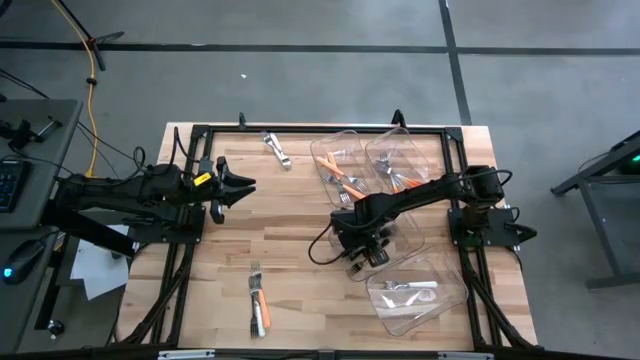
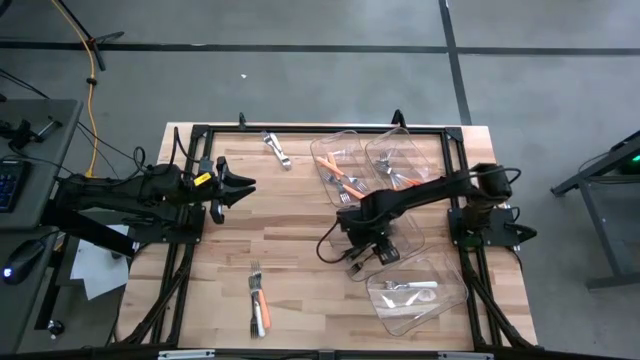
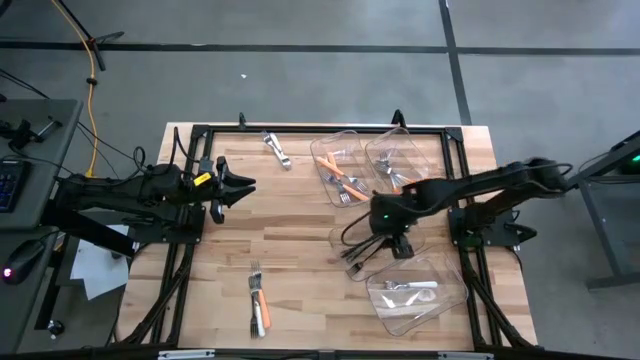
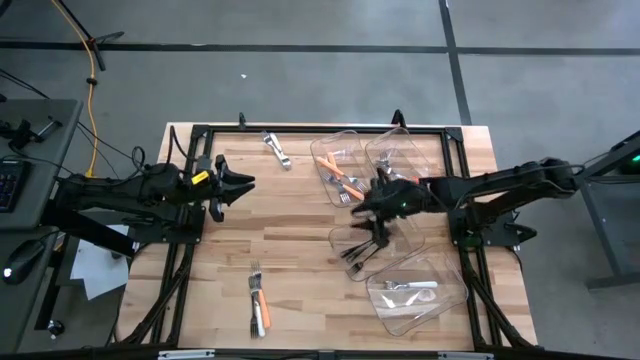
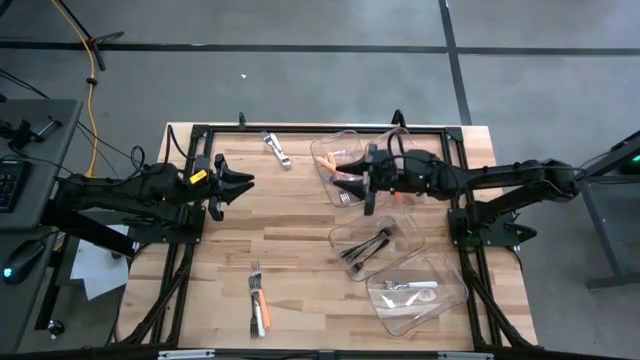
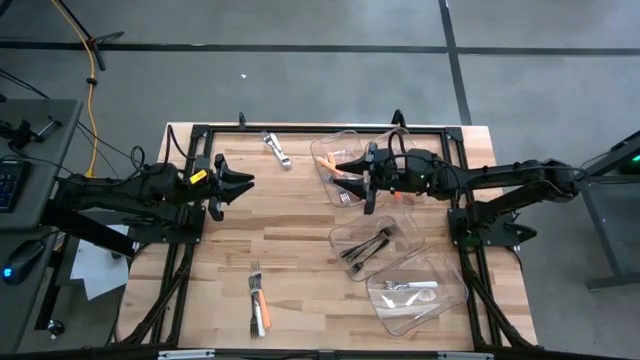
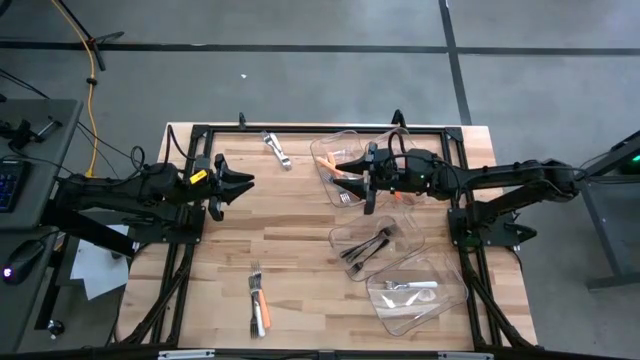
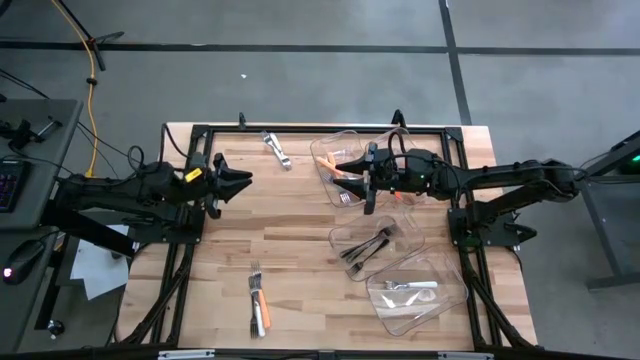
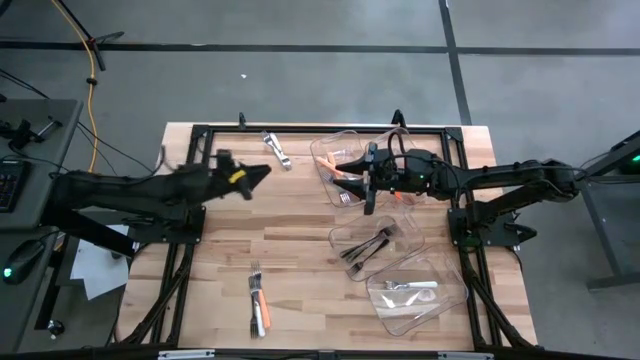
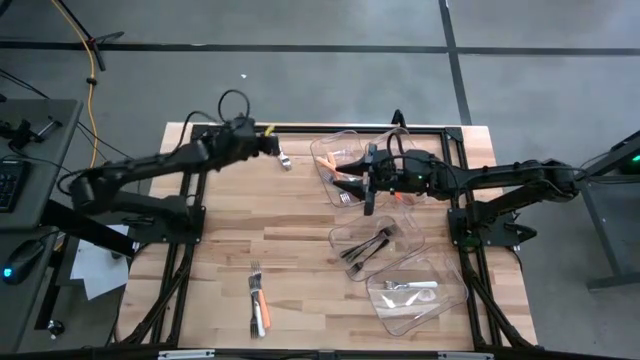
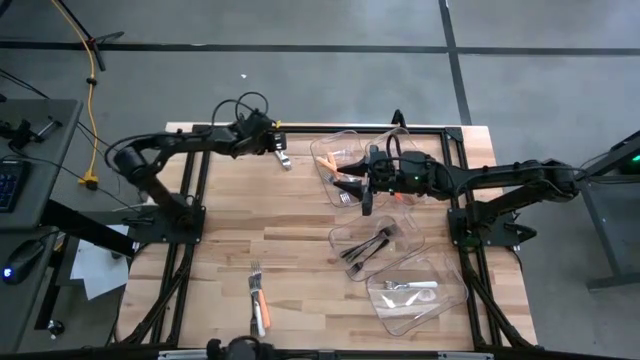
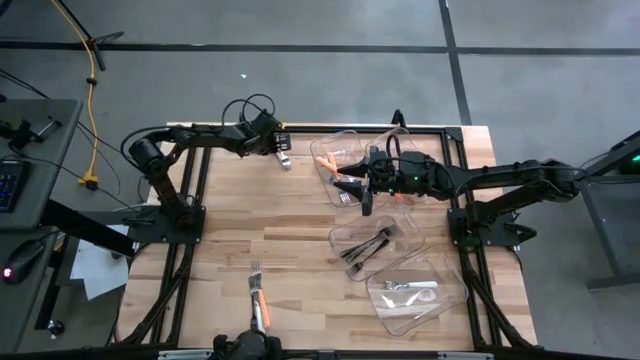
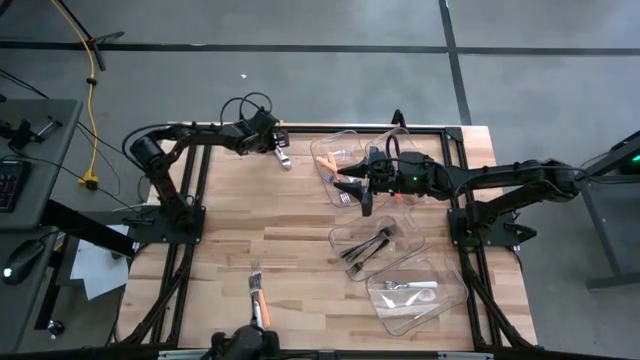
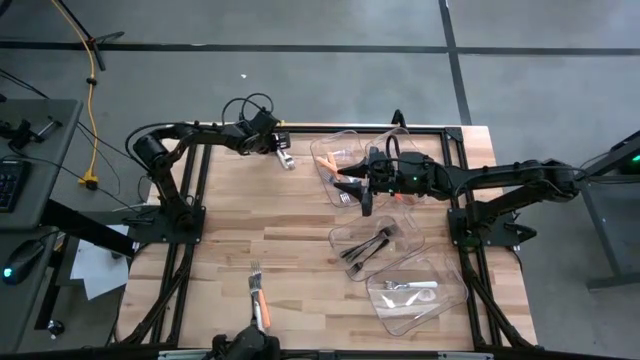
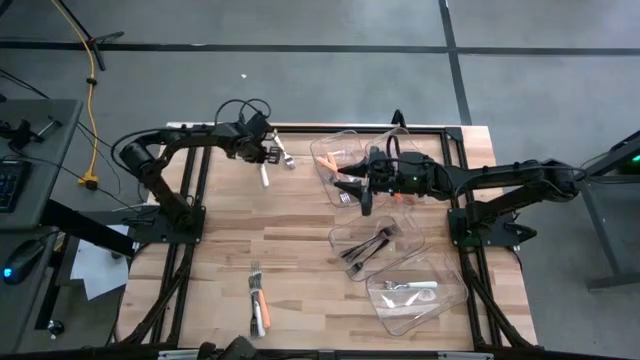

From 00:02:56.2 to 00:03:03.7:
Task: Sort silverware by color (type)
Move the top white fork to the bottom

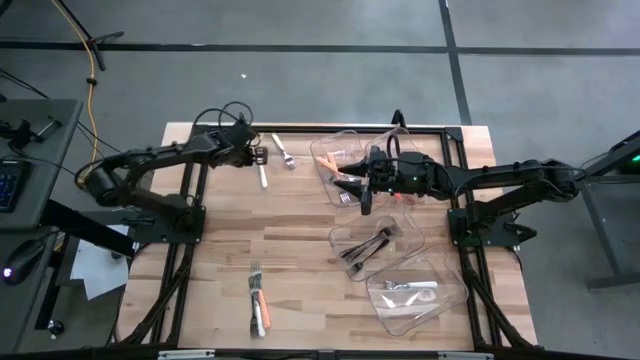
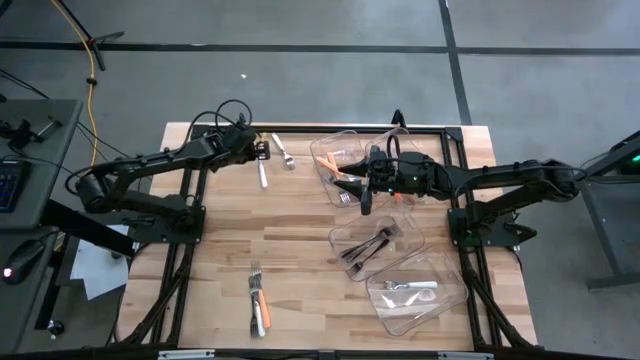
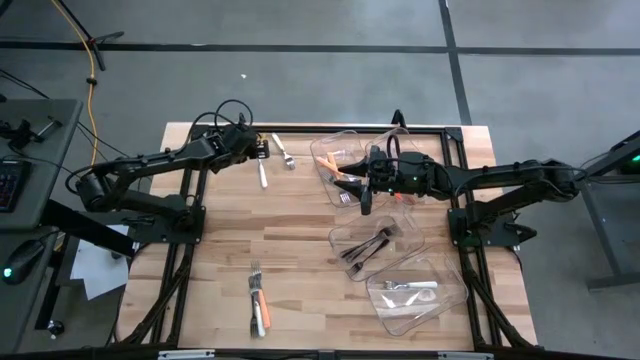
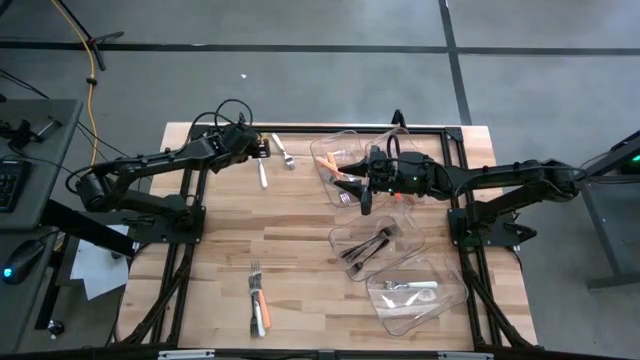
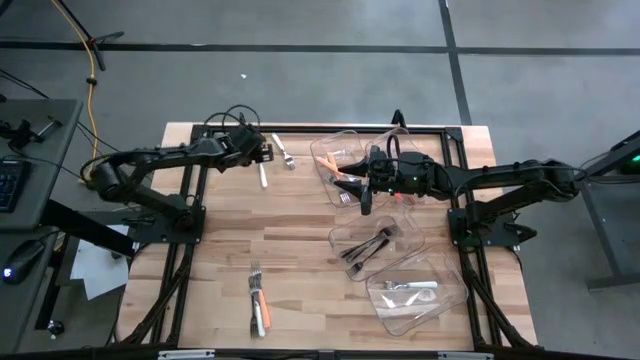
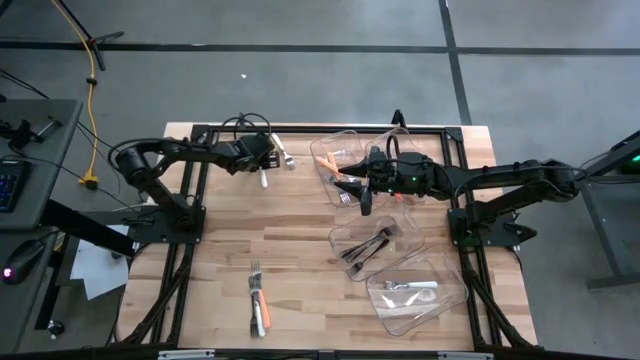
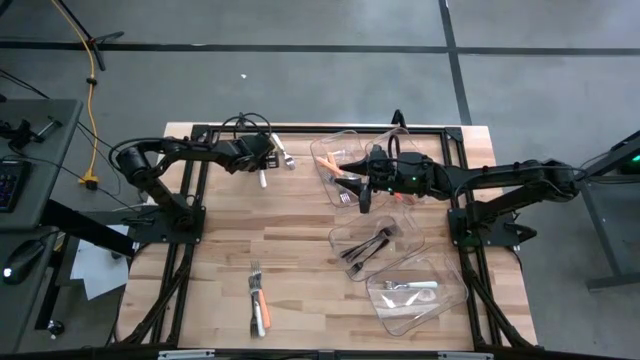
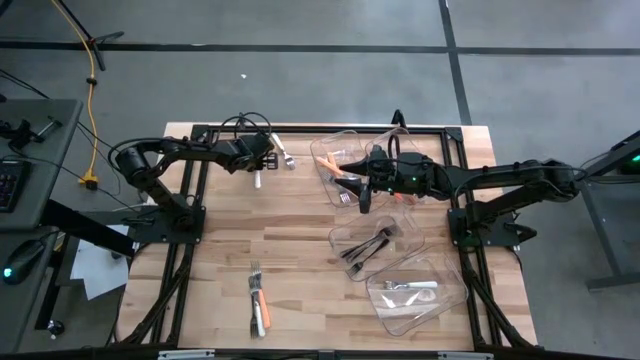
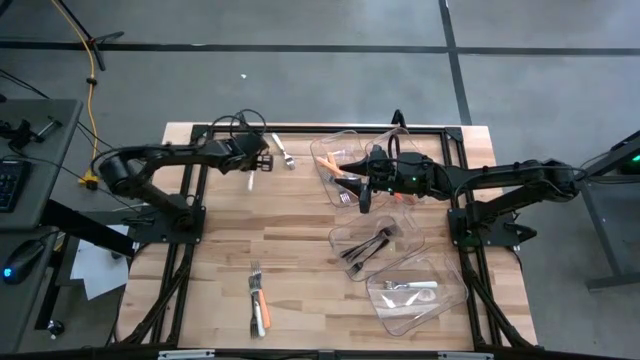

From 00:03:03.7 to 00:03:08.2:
Put the white fork into the bottom transparent bin

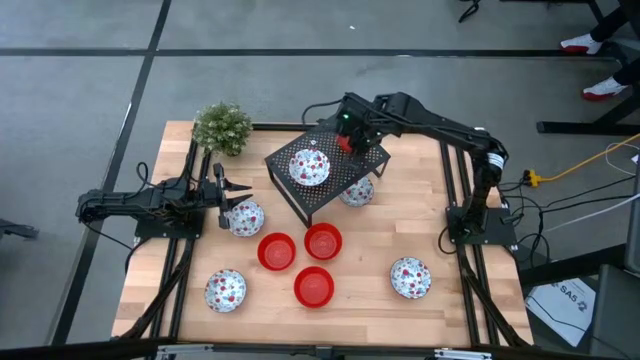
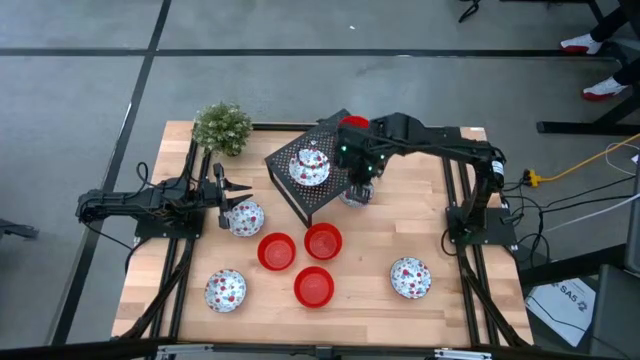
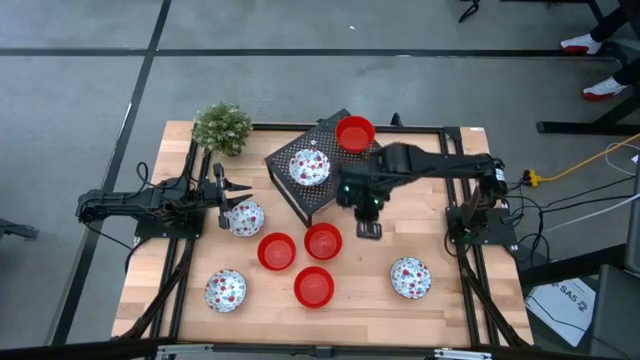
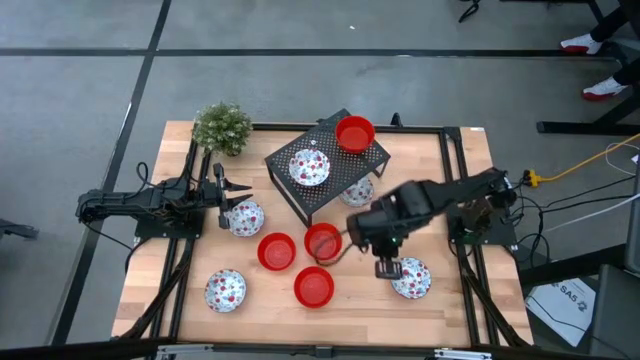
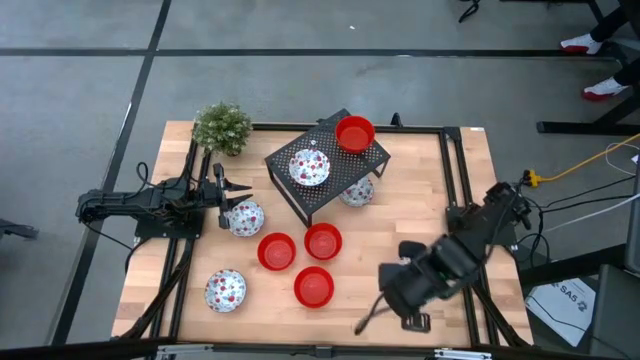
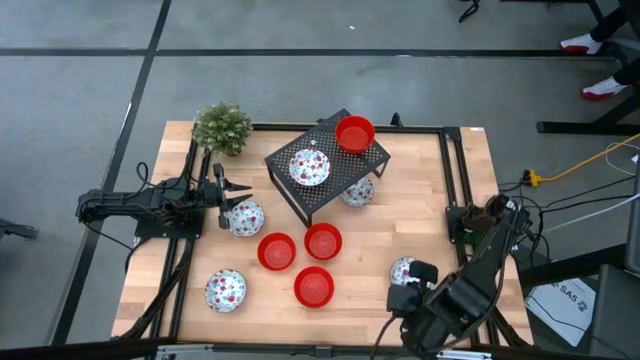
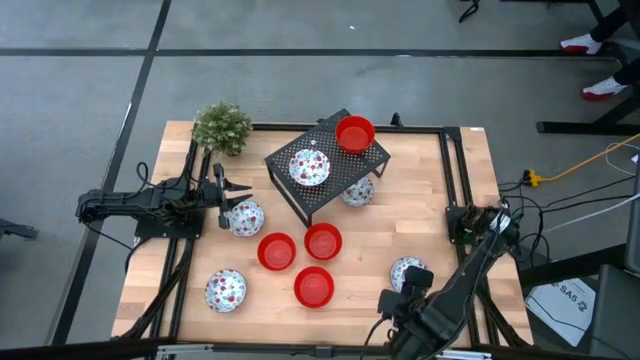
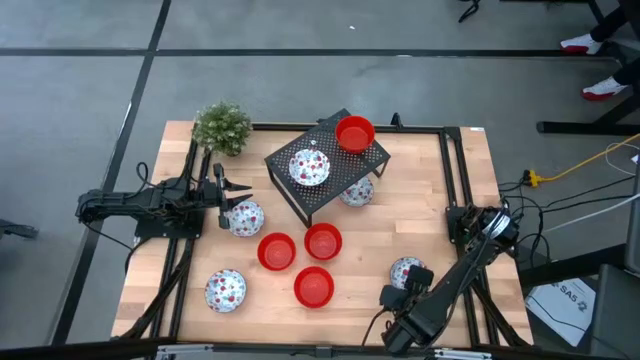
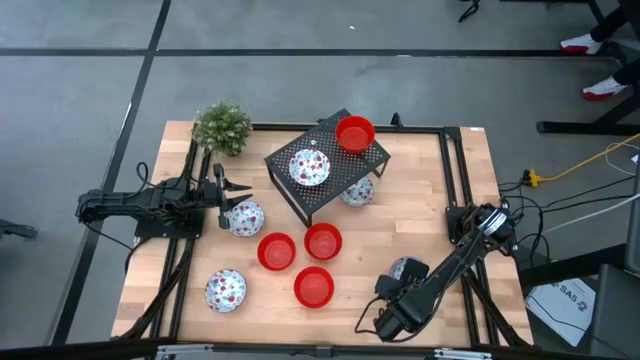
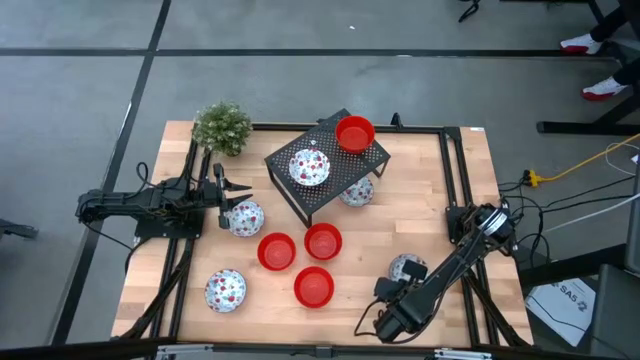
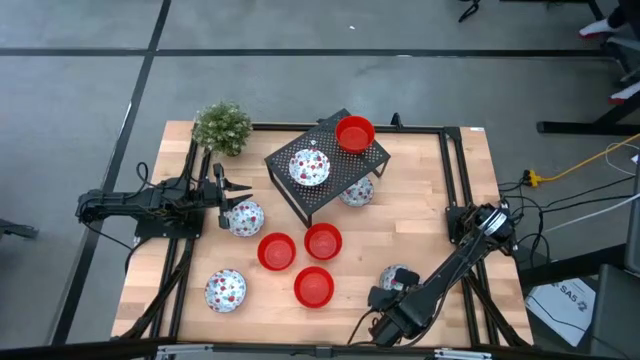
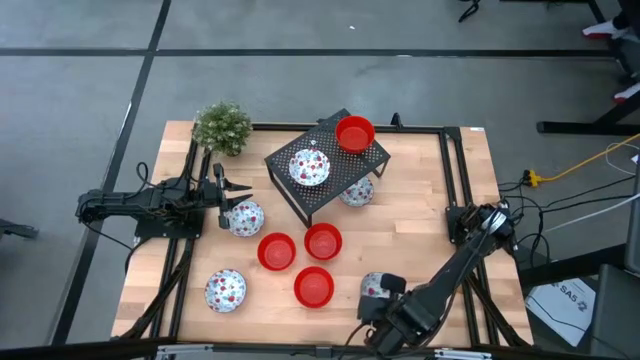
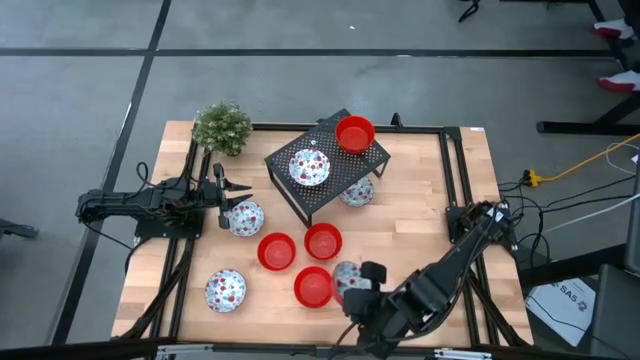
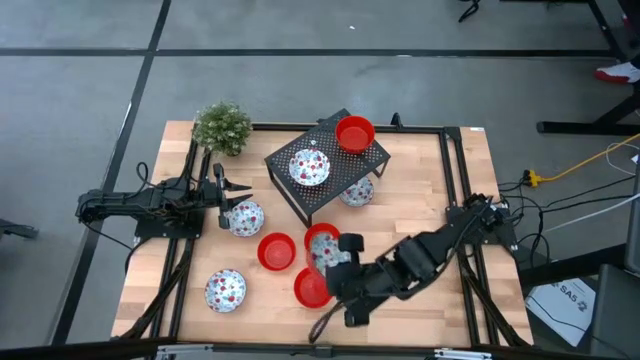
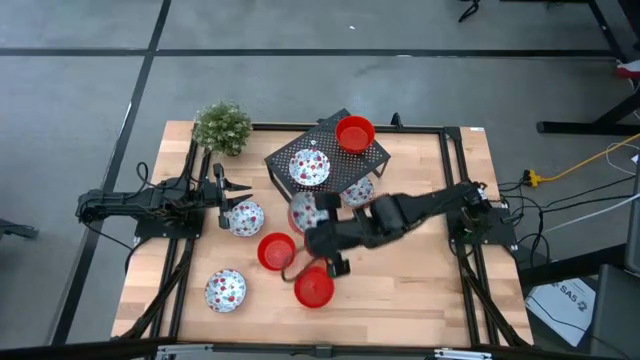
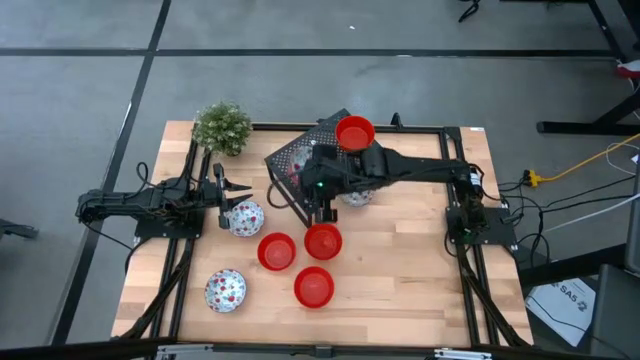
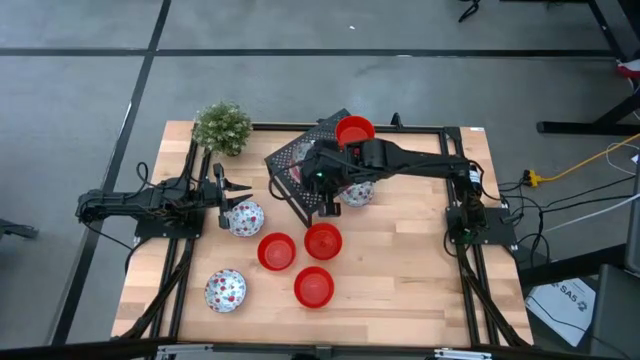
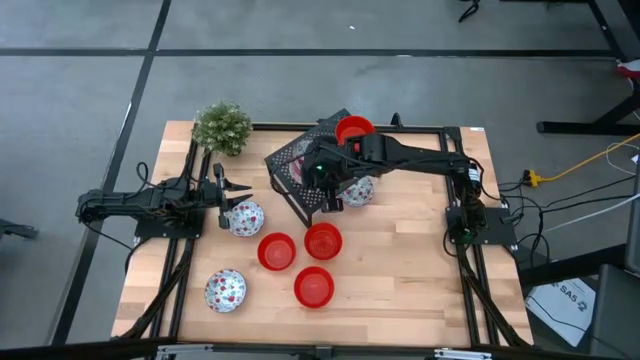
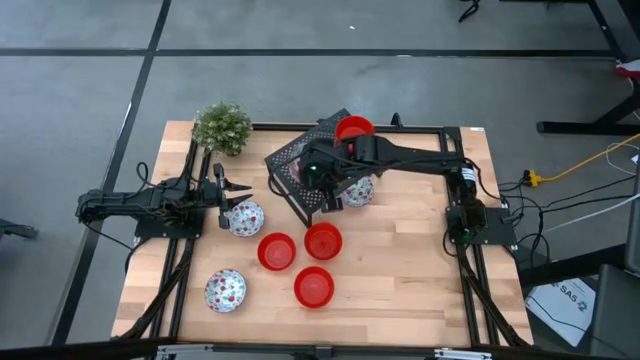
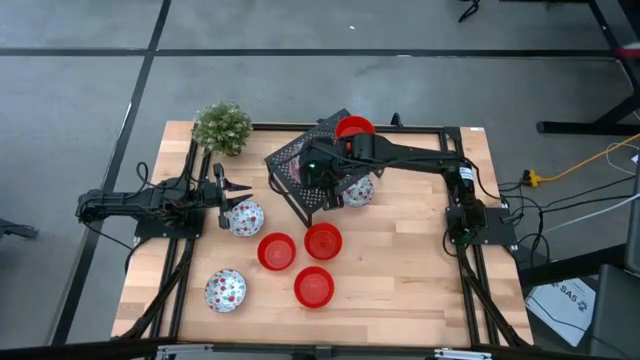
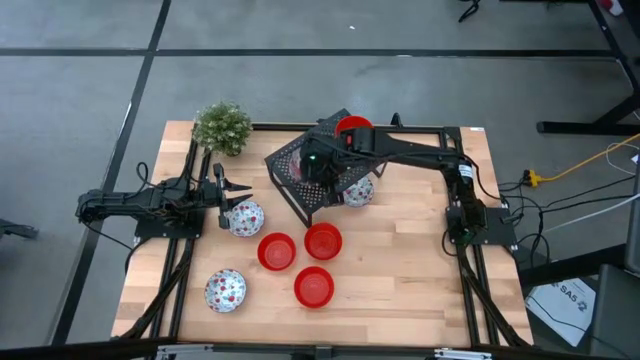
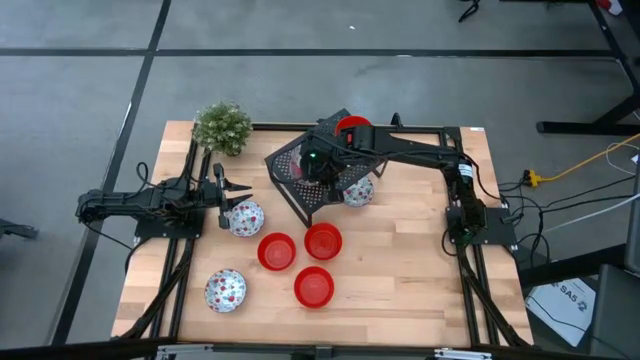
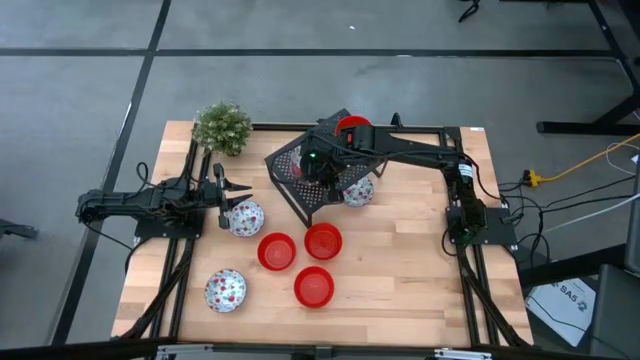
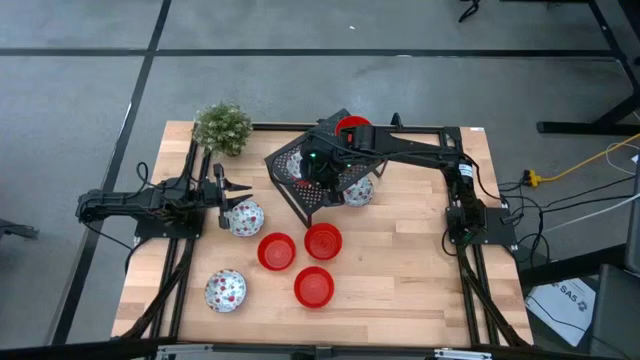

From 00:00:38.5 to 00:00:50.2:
Task: Pick & Place Mini bowls
Stack the white patterned bowl on the white patterned bowl on the shelf
